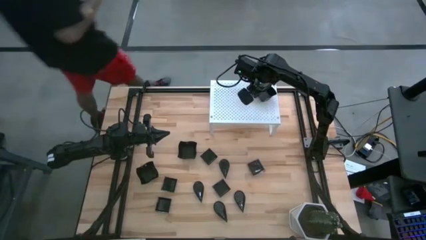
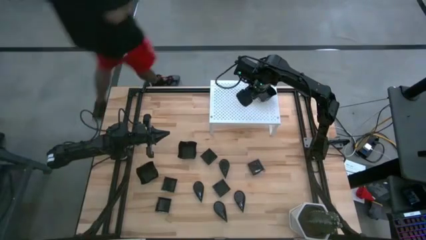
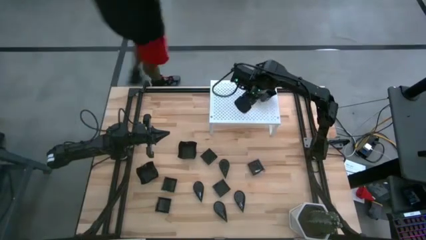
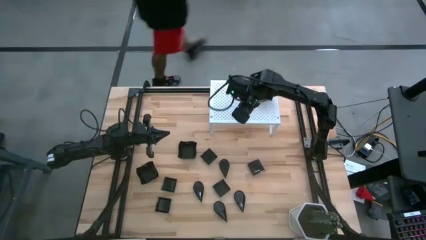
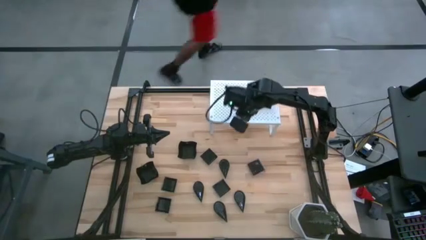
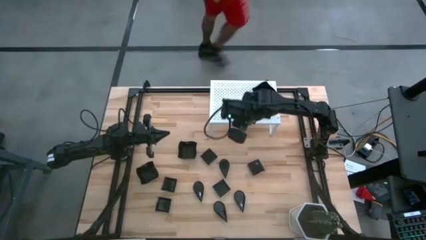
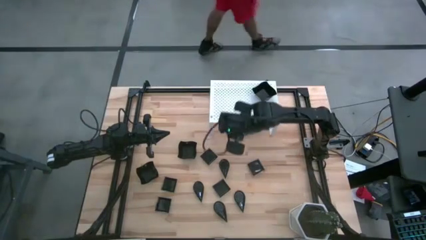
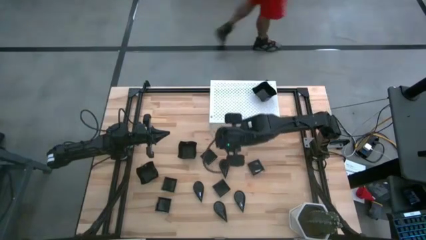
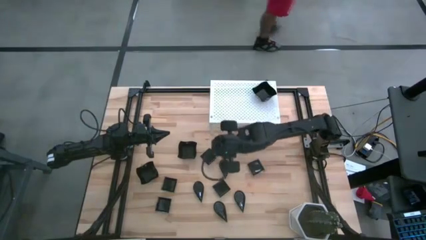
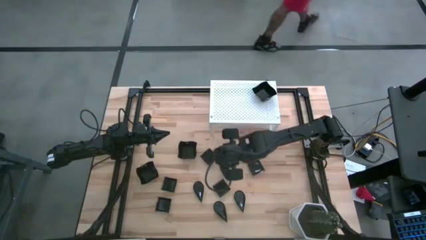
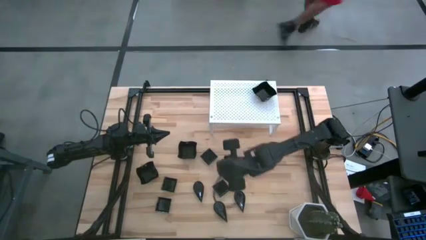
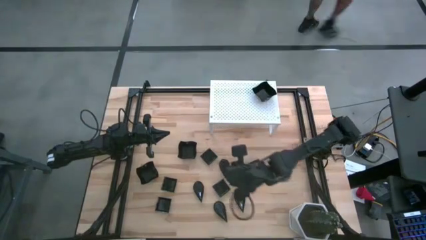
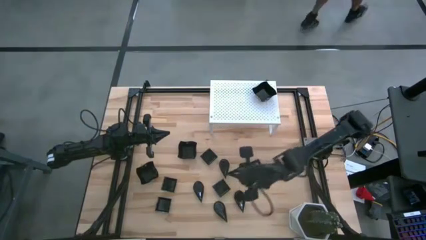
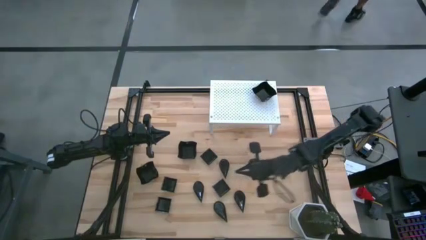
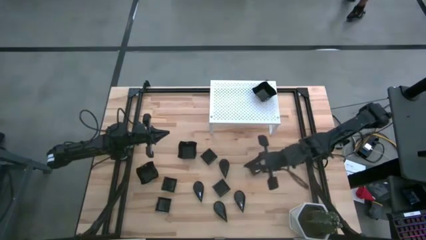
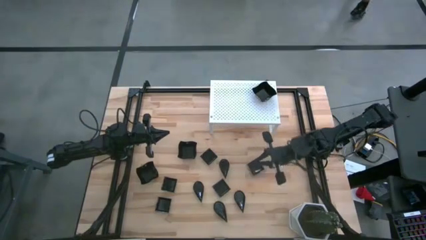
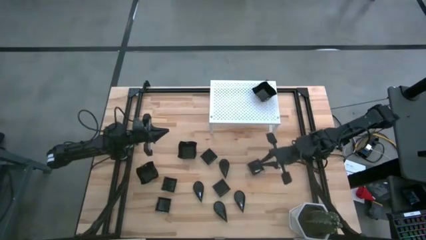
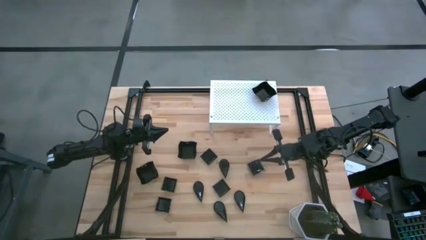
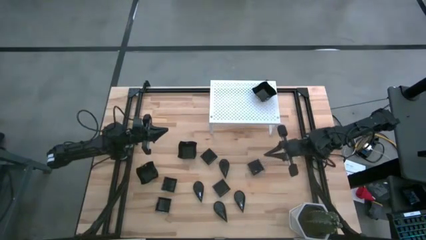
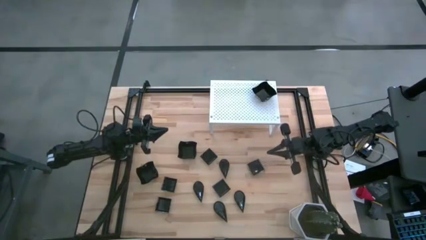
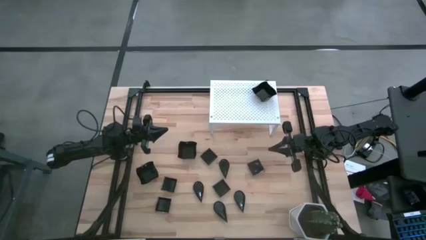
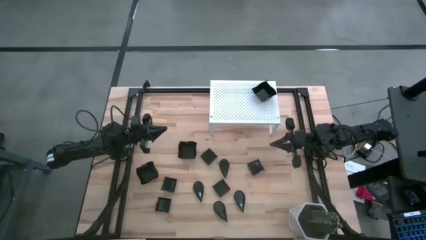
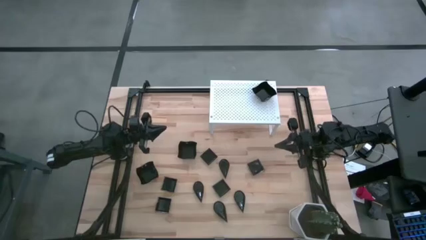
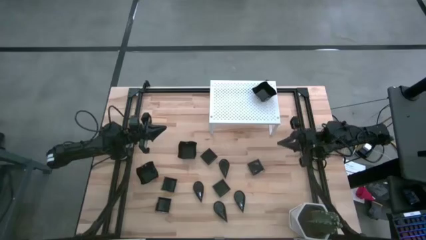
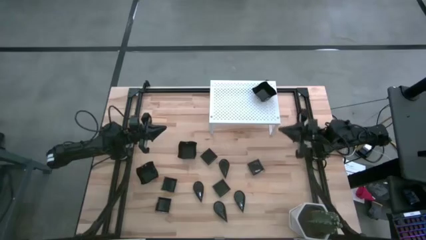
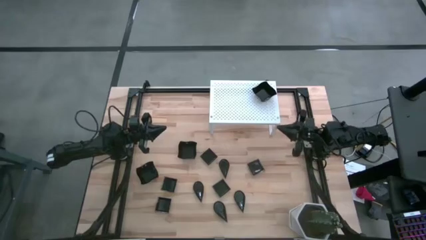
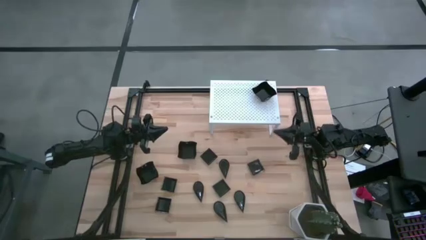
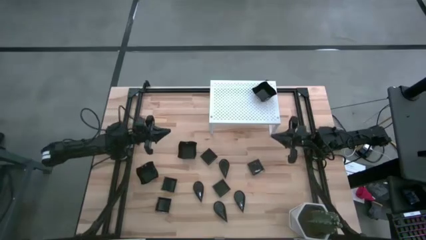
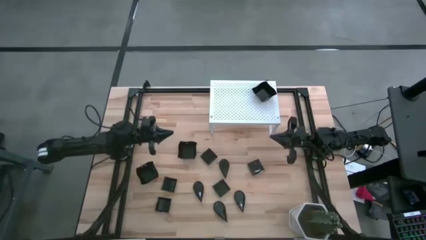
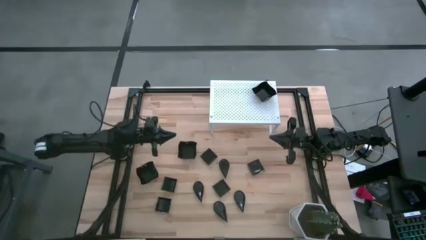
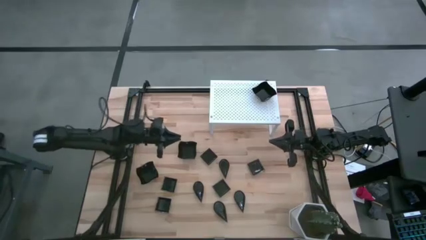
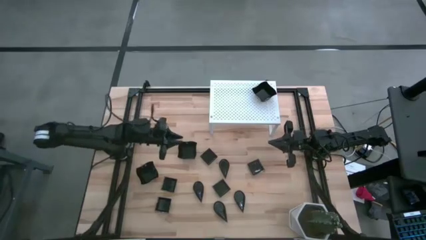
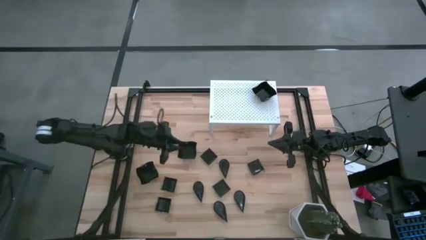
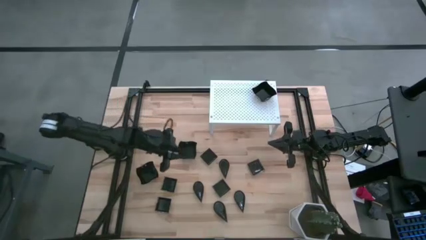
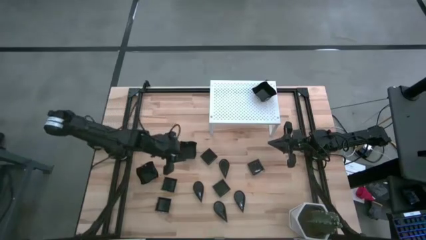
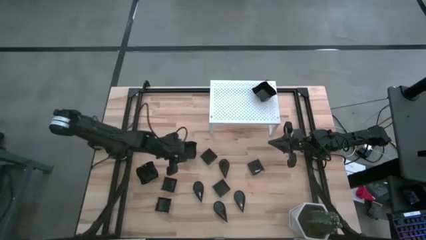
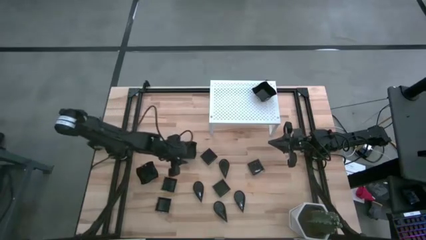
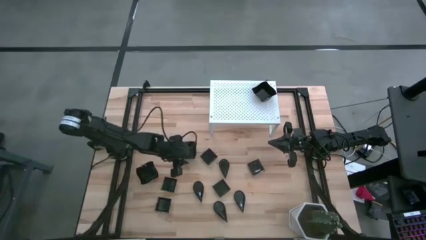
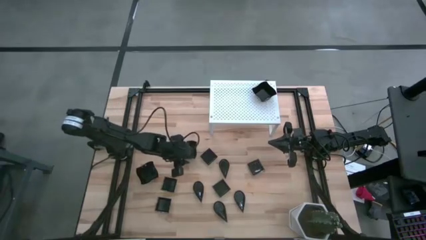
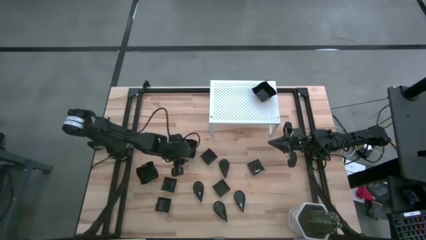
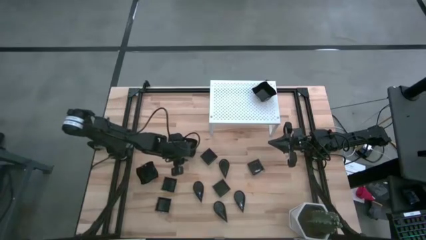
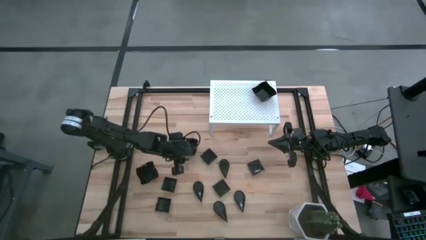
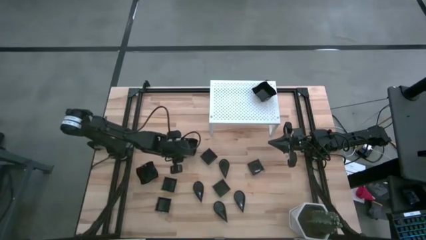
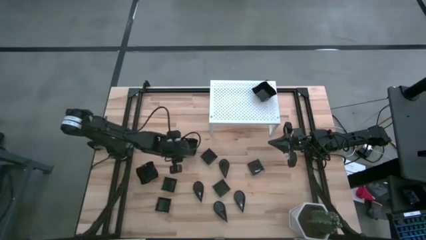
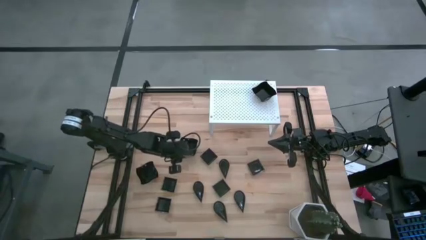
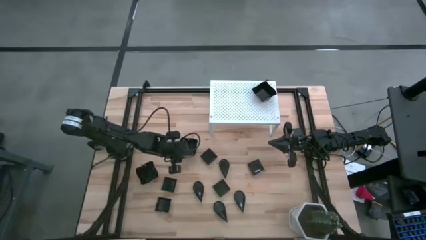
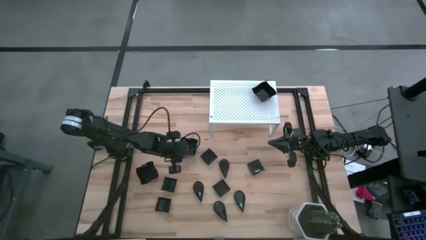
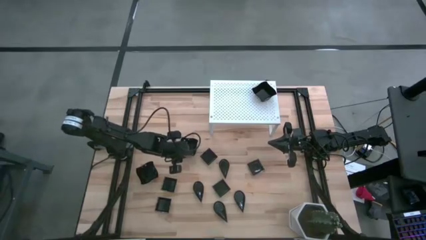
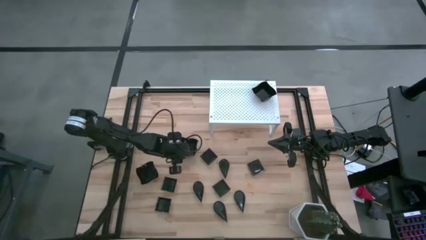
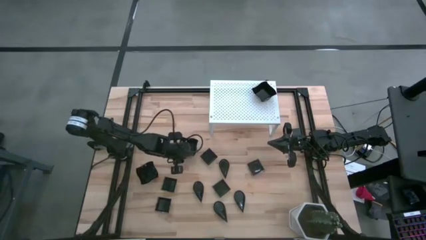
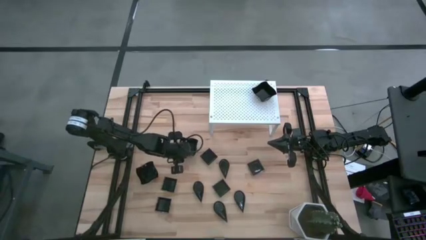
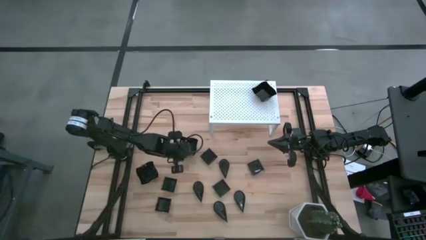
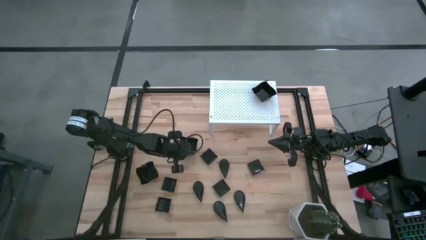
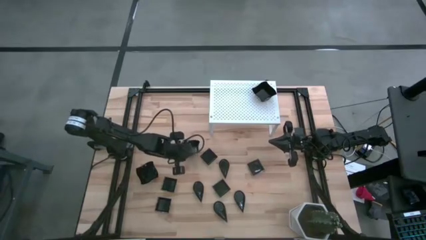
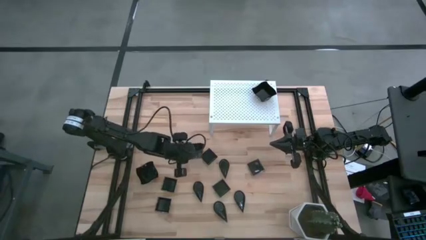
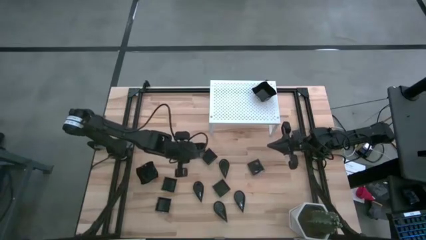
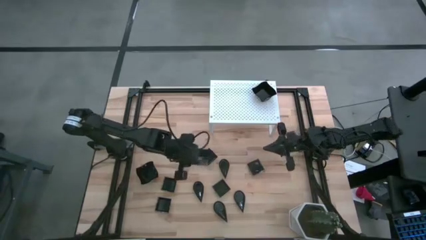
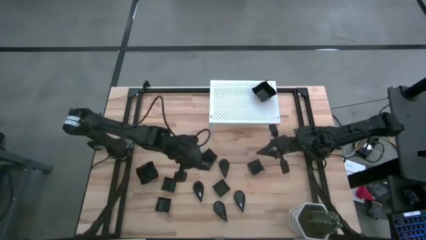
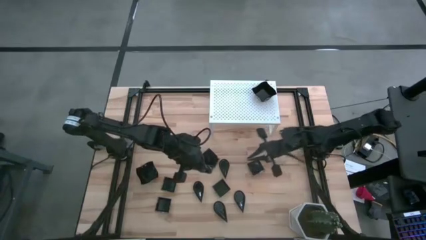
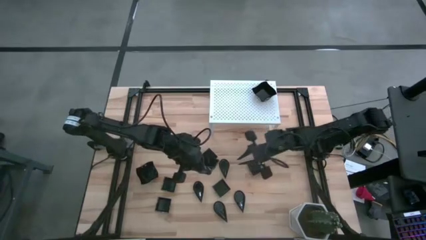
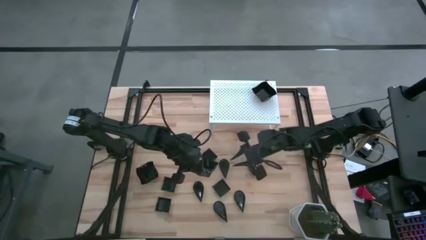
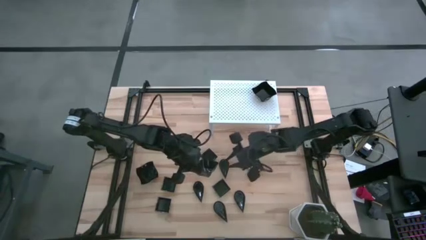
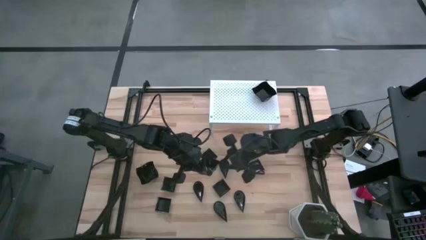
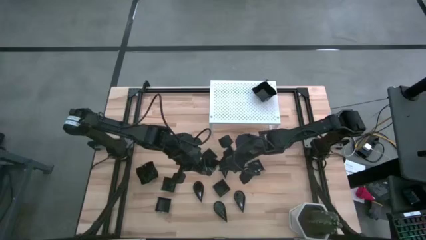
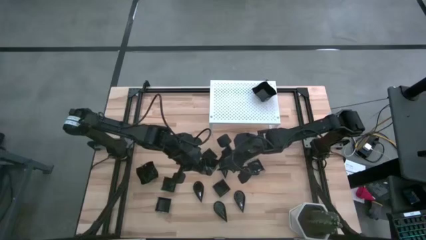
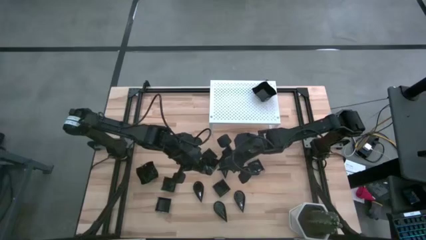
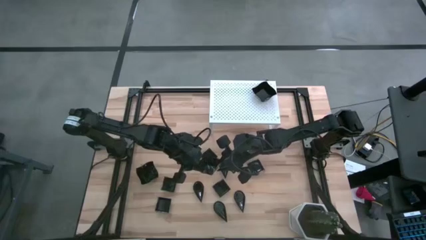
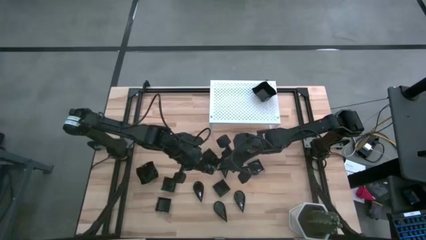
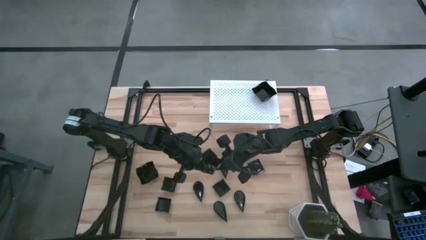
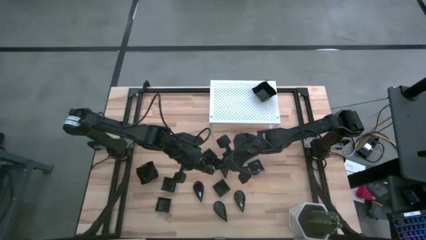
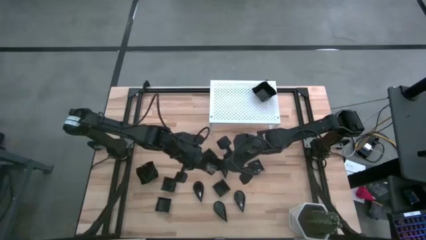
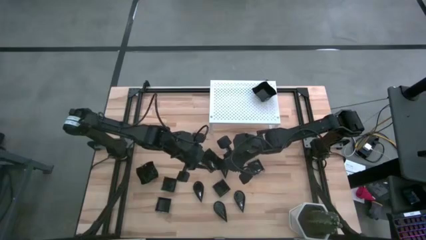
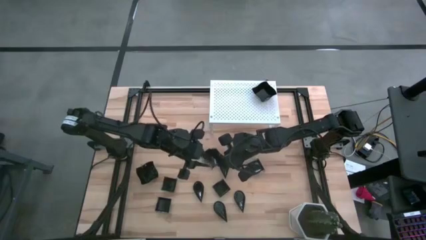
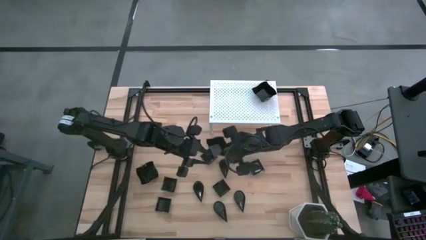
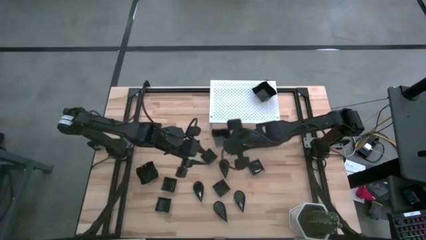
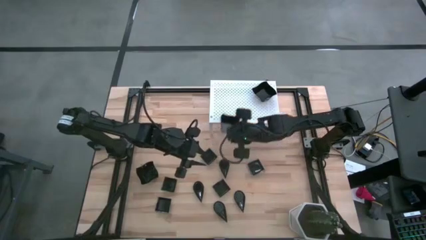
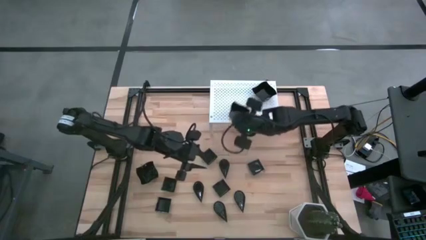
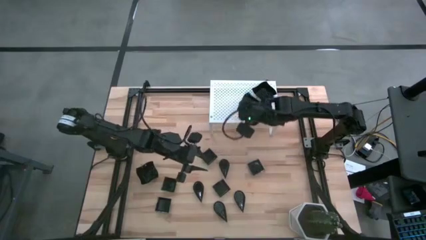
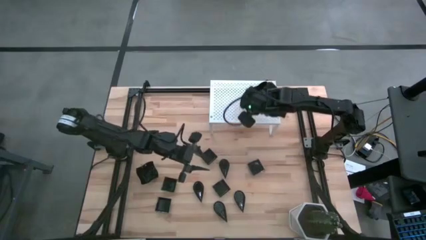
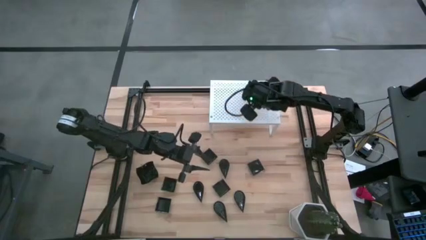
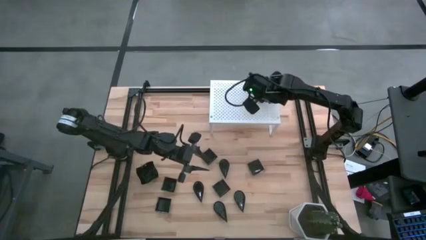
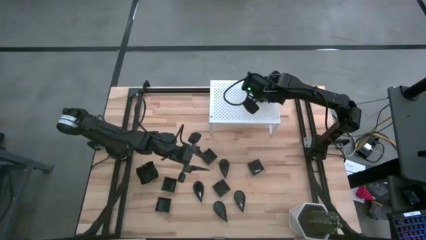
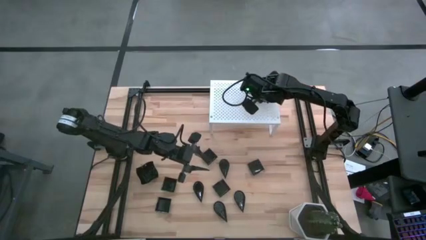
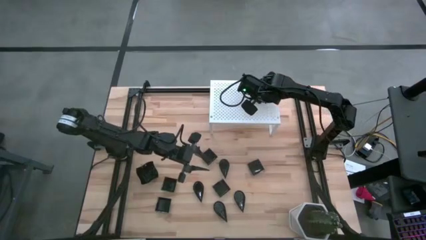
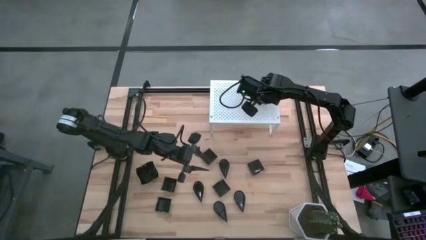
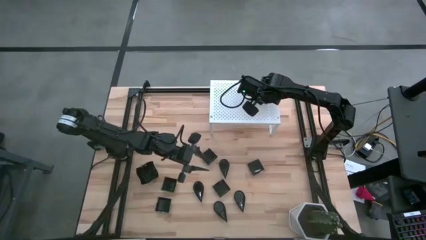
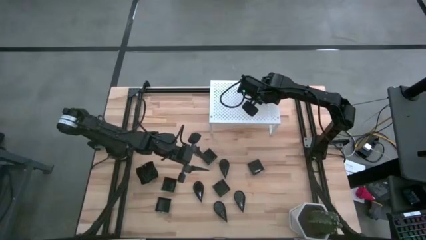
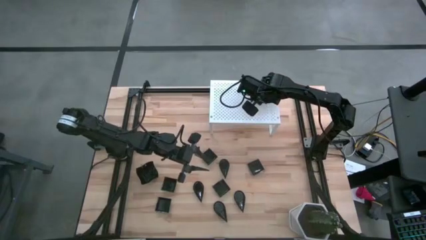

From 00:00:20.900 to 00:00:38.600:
Task: Pick & Place Mini shaped plates
Stack the distorted square plate on top of the distorted square plate on the shelf
